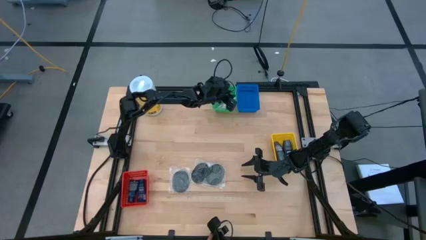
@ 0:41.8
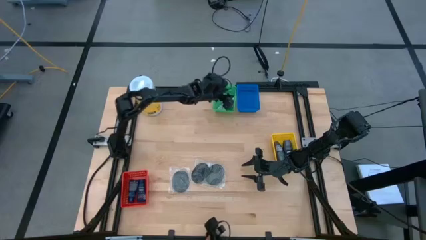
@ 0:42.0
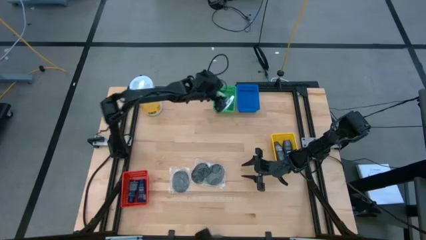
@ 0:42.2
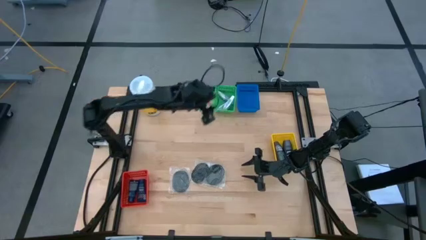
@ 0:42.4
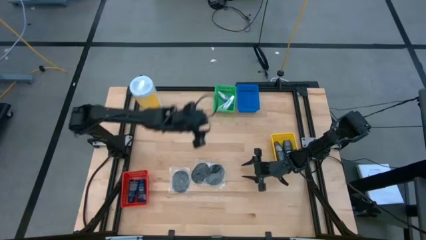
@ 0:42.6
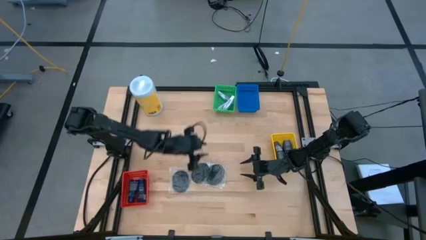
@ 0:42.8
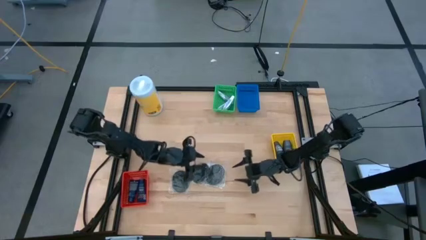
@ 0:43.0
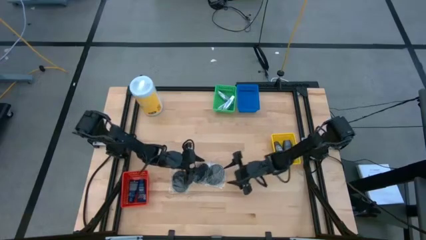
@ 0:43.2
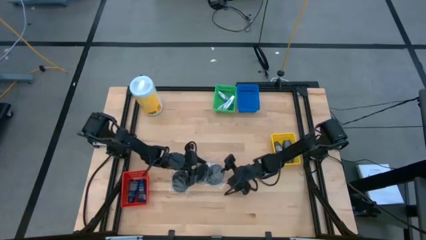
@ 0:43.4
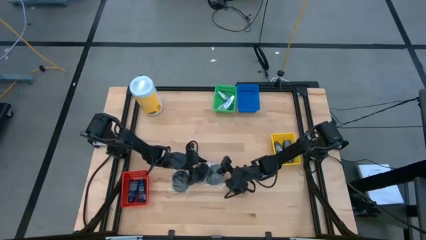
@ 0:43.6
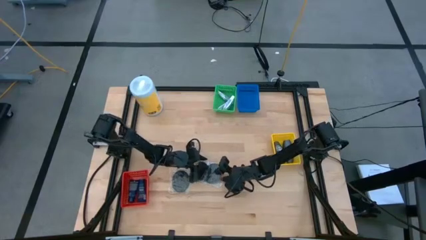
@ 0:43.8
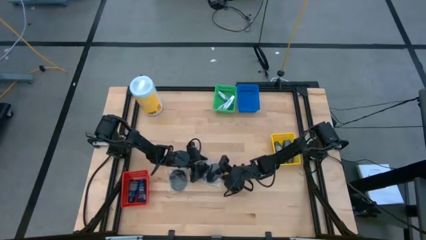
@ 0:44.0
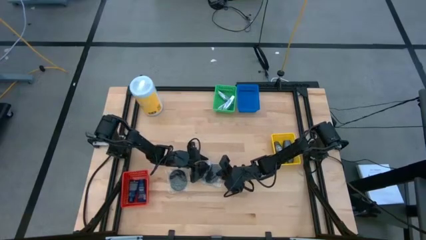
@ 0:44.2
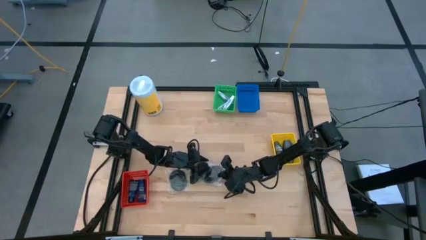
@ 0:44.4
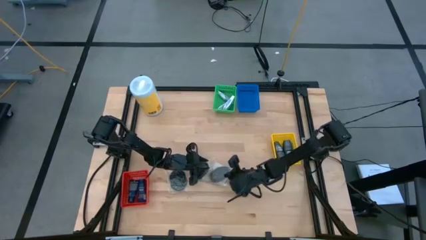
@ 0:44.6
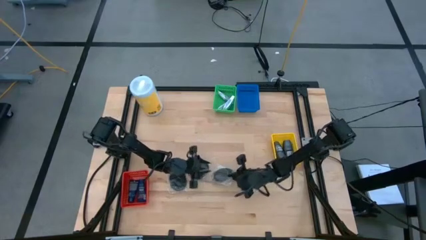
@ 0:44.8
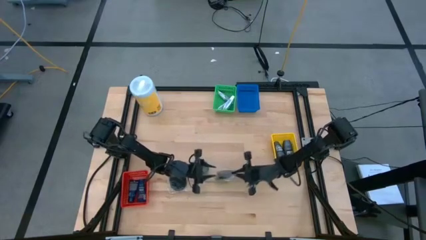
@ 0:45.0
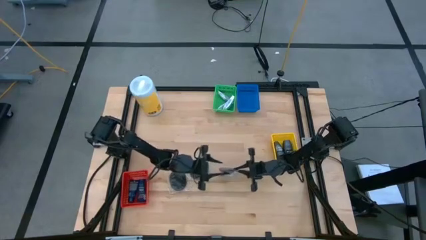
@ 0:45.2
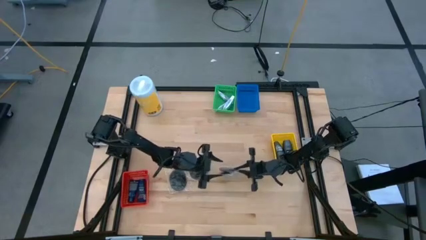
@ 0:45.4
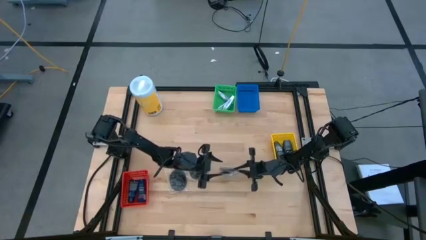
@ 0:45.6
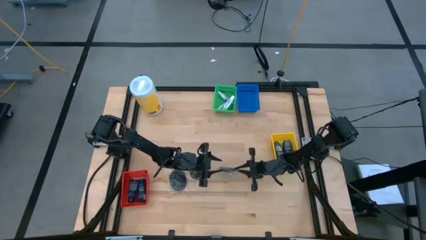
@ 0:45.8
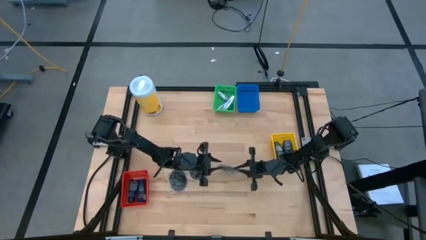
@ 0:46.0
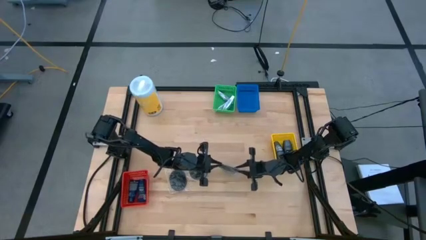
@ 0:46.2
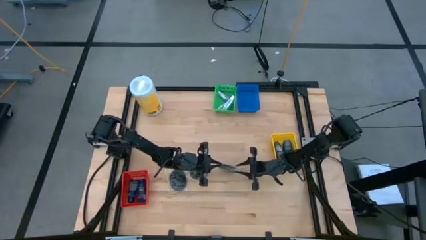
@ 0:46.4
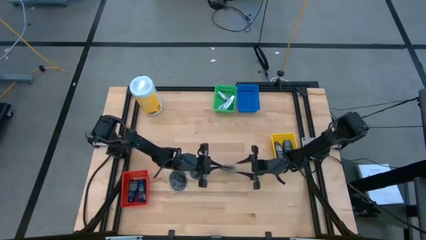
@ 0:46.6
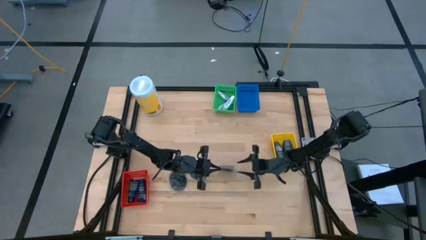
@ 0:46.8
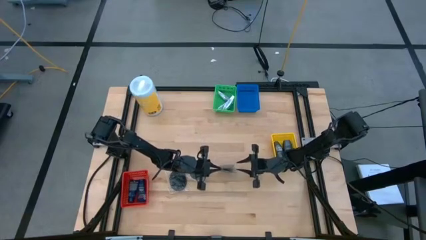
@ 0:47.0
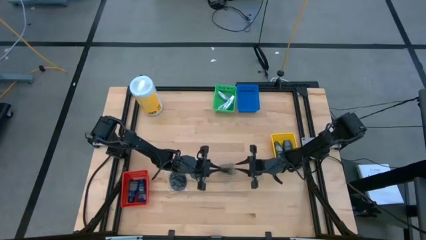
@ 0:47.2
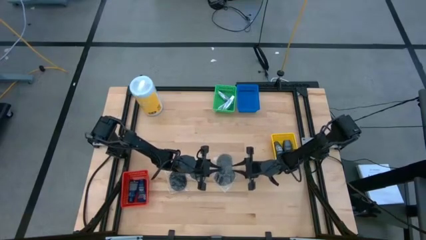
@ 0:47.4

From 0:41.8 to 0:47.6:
Task: Pick & Place Travel size toiletries
Put the black hairbrush into the blue basket

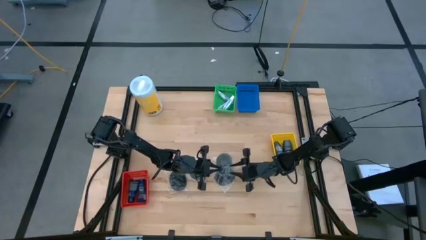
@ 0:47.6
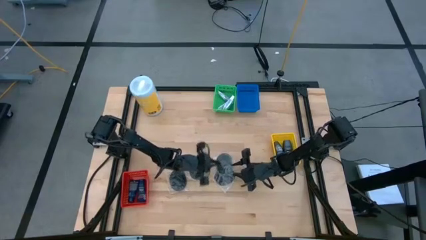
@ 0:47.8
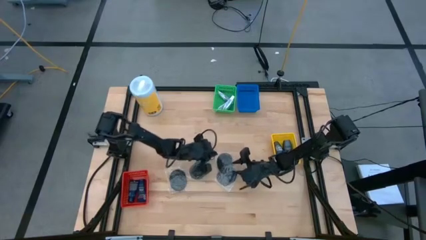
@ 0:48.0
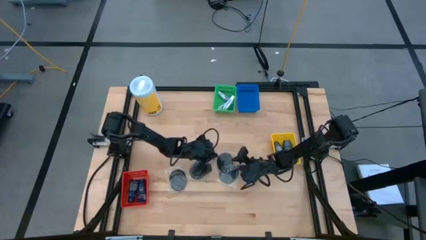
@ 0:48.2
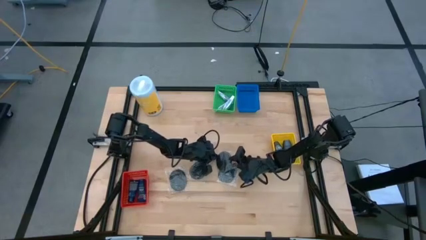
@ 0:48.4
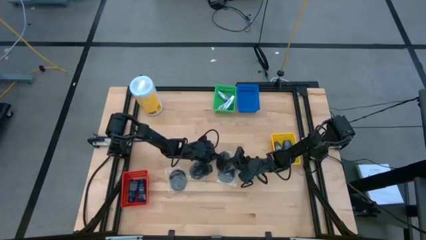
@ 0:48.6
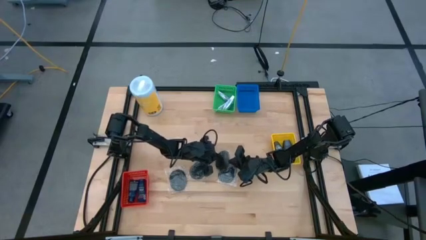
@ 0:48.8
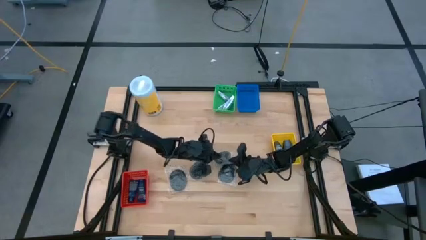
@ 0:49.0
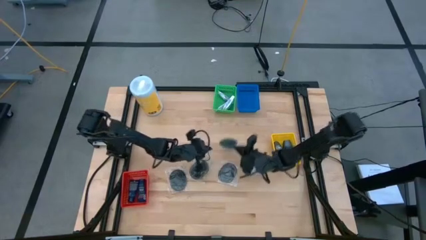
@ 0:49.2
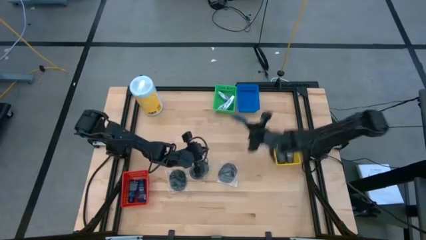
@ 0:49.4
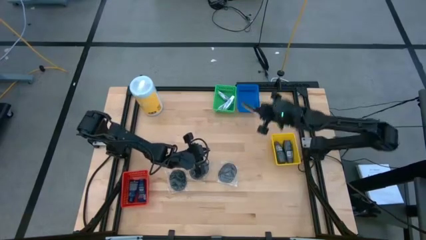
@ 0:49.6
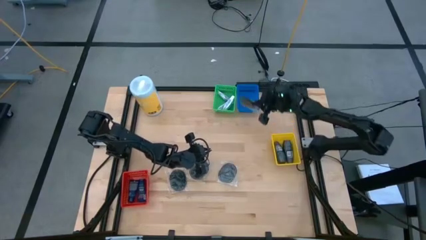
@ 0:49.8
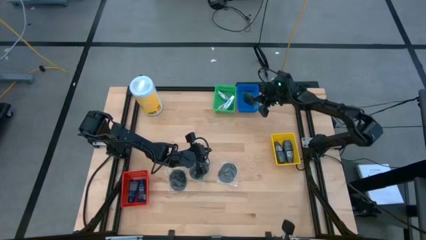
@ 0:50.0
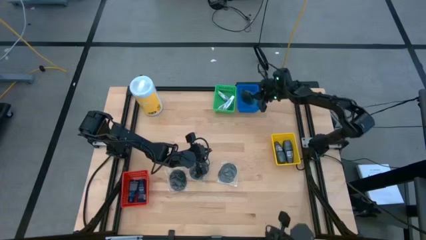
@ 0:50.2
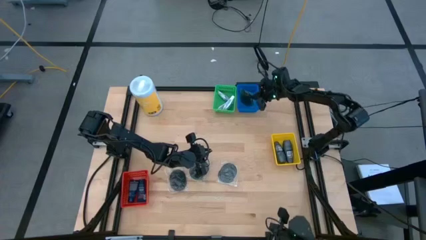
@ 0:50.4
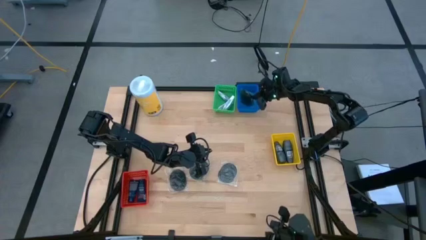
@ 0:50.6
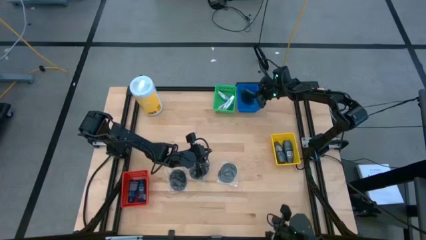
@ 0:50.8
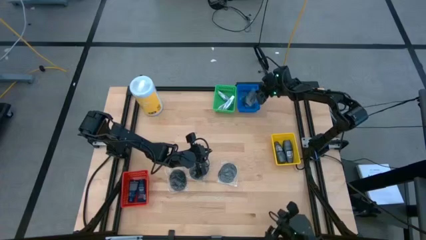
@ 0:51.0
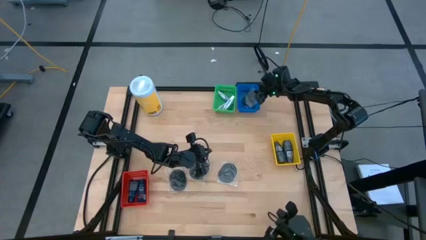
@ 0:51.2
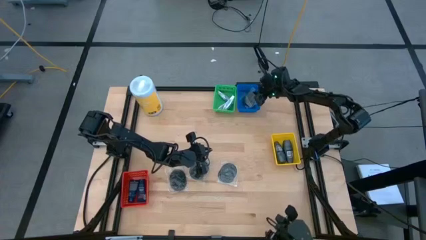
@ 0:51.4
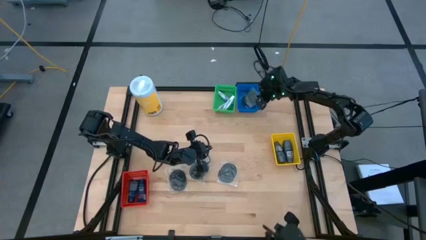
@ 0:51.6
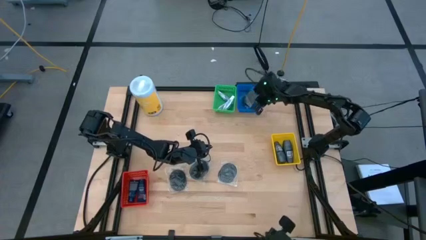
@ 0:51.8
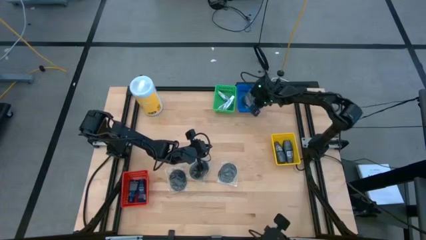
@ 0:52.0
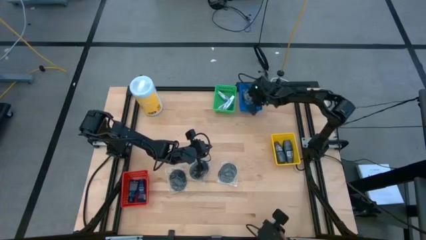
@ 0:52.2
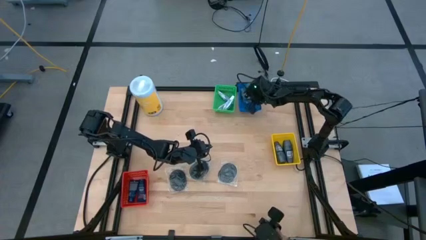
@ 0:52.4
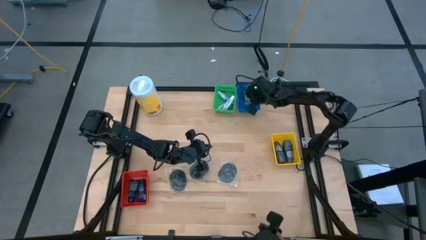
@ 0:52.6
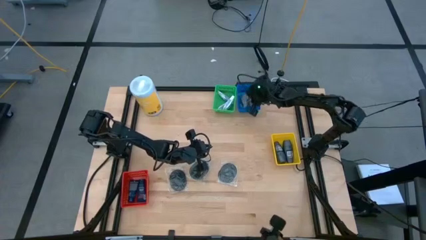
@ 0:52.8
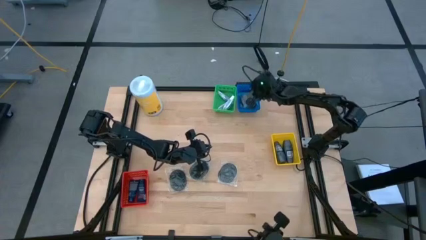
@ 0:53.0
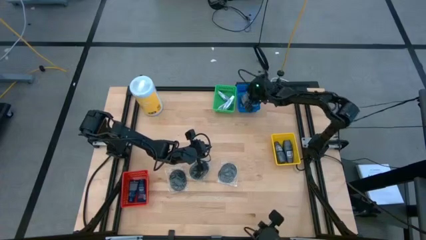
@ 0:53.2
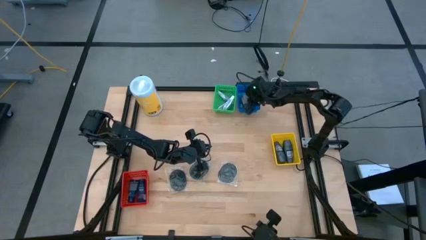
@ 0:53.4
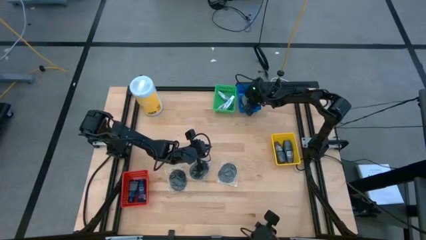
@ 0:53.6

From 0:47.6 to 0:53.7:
Put the black hairbrush into the blue basket

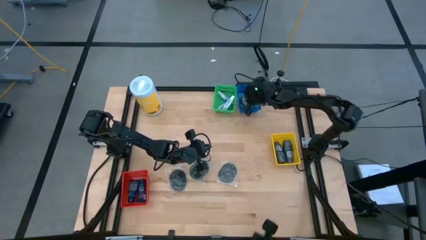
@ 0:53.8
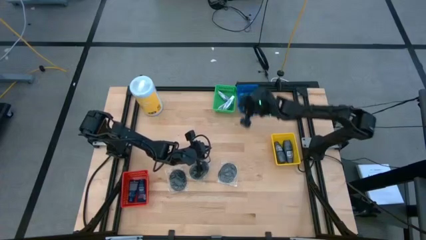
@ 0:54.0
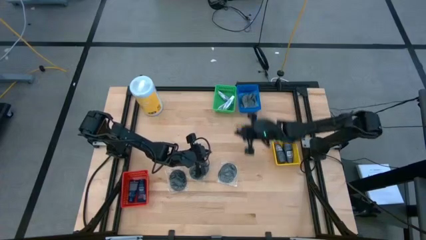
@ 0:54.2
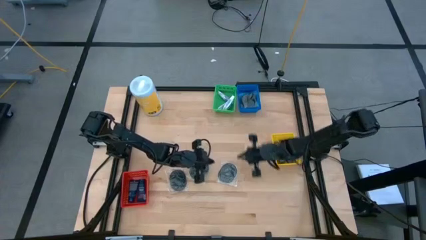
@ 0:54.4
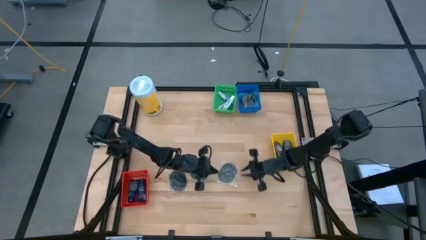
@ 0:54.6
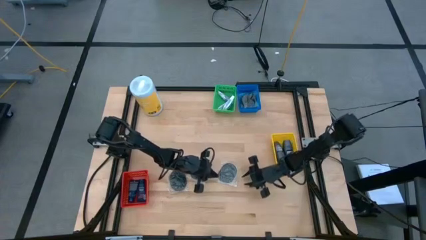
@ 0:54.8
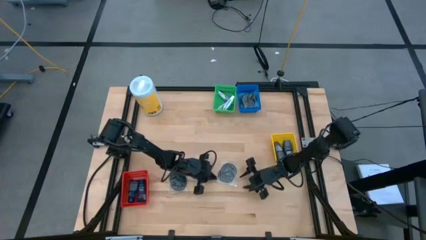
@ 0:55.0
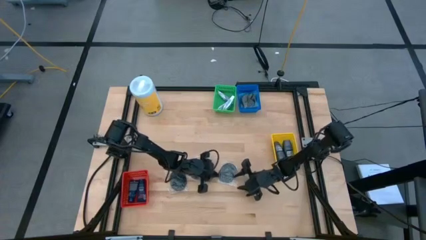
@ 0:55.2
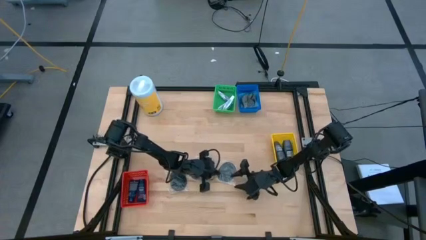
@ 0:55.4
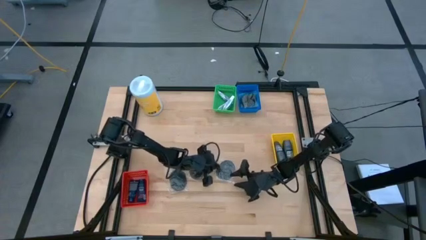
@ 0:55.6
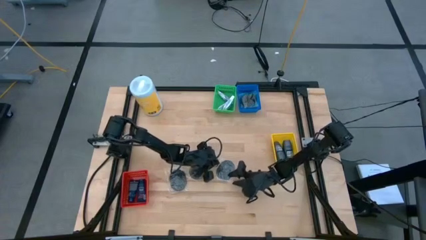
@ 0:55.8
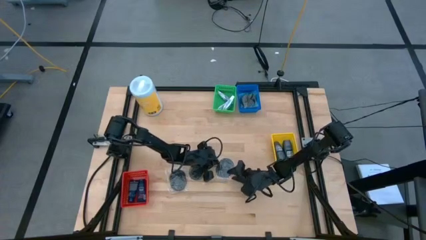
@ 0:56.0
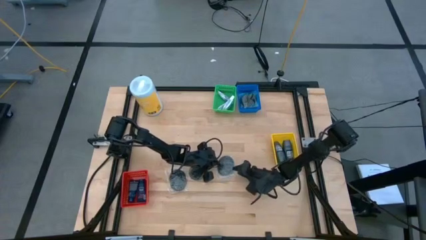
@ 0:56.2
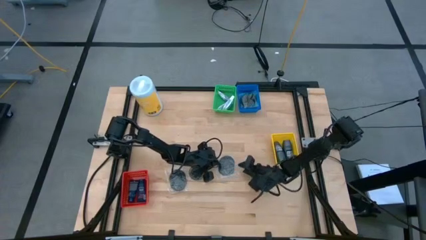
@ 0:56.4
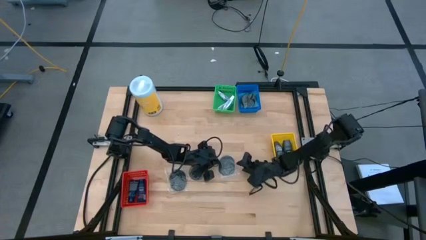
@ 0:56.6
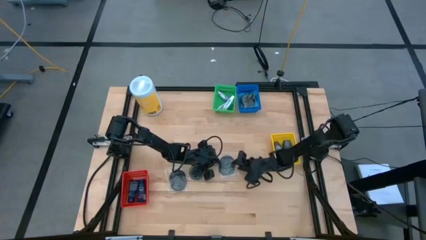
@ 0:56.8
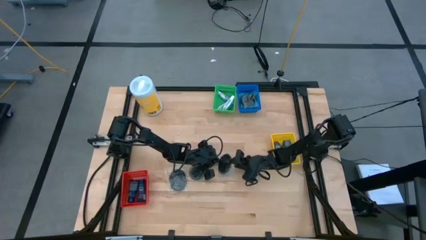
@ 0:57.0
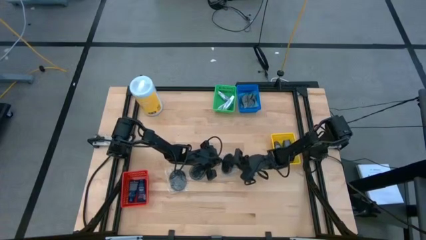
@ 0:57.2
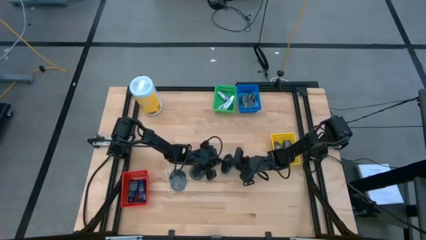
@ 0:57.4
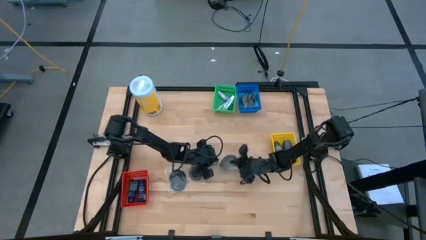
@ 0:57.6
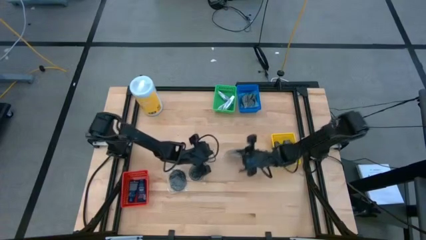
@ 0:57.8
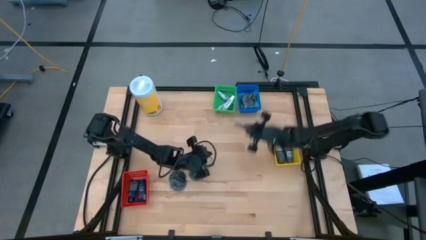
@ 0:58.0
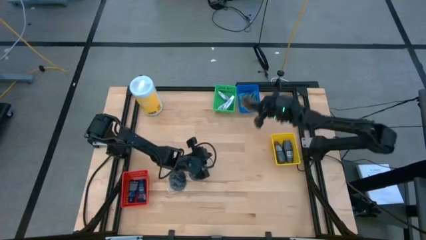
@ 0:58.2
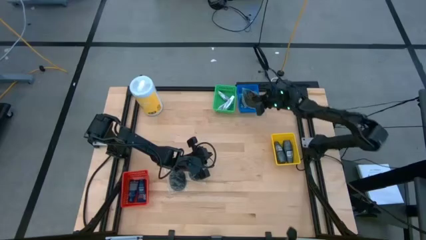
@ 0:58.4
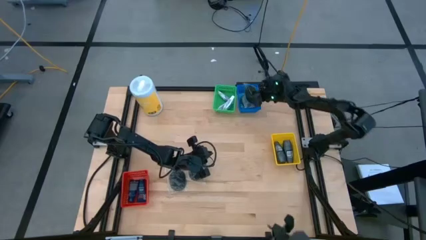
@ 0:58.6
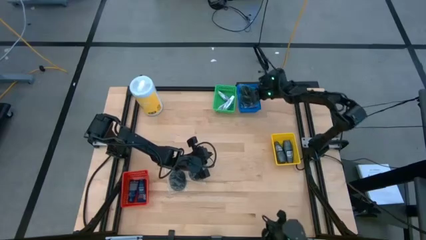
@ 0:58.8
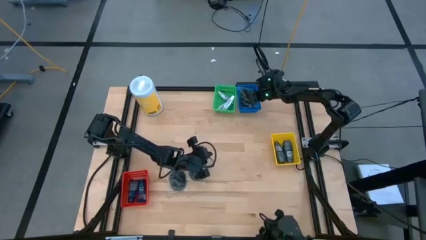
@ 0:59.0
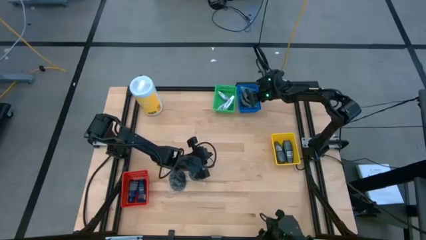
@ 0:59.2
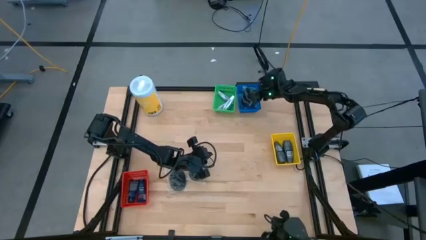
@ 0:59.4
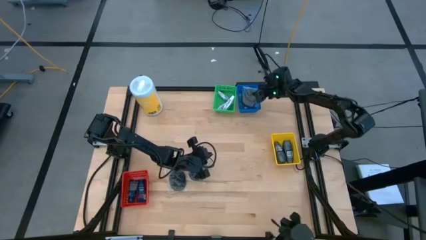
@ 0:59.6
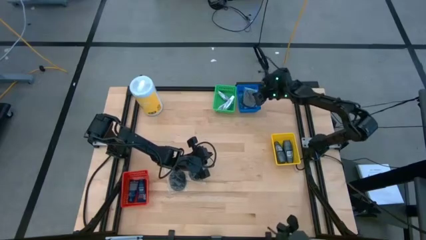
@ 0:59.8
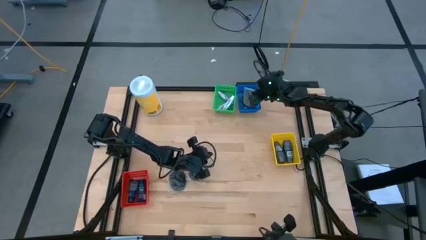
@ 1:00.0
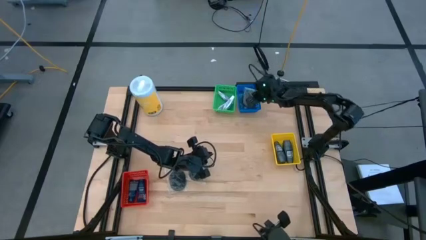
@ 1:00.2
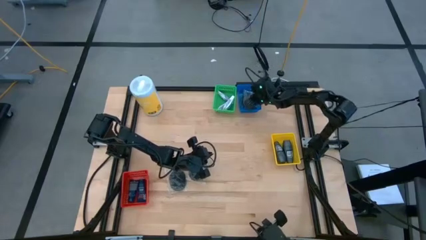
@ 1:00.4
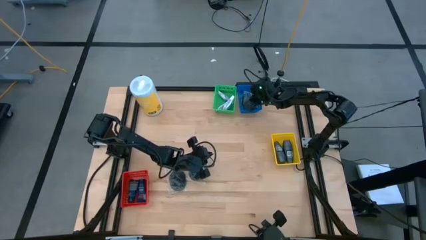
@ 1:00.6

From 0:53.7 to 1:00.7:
Put the black hairbrush into the blue basket
